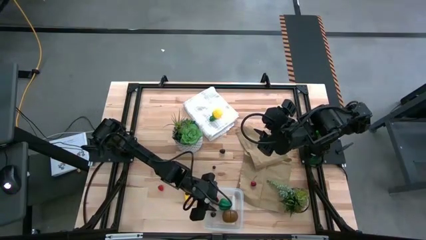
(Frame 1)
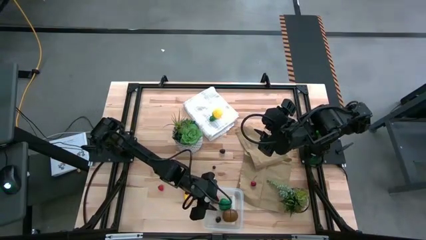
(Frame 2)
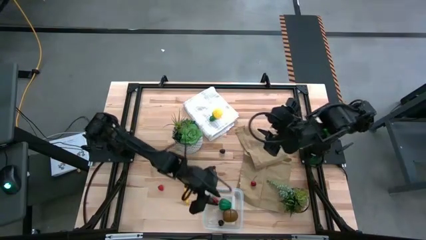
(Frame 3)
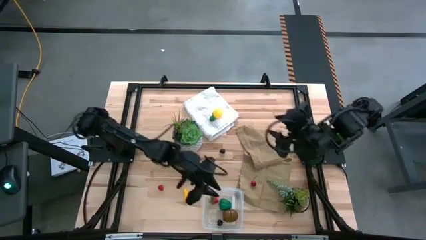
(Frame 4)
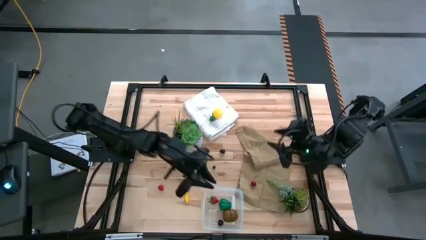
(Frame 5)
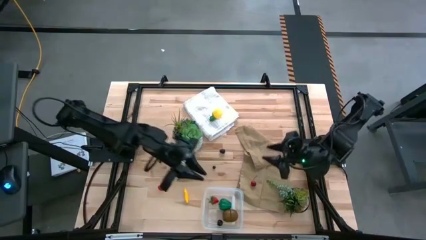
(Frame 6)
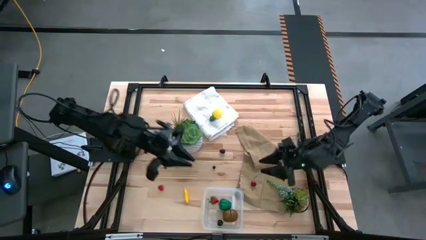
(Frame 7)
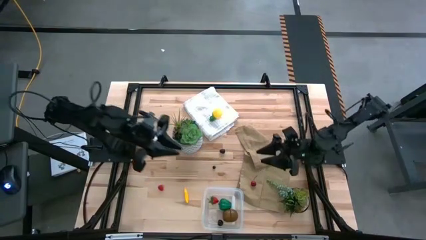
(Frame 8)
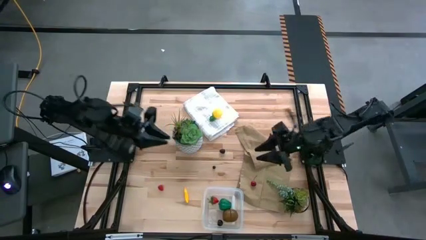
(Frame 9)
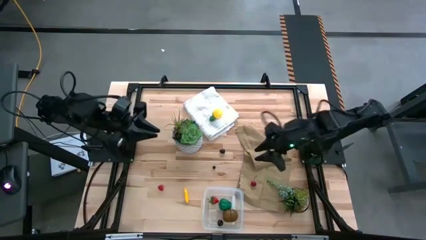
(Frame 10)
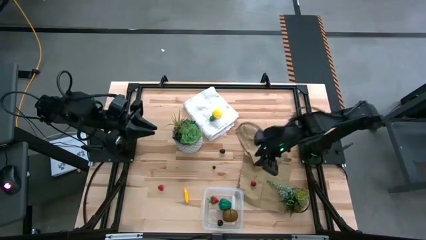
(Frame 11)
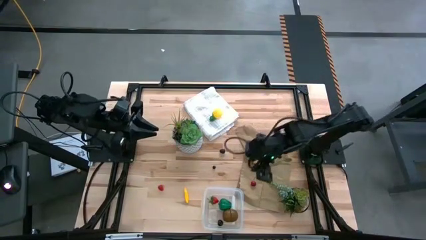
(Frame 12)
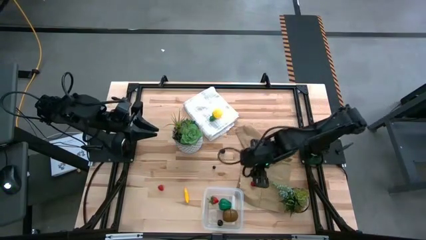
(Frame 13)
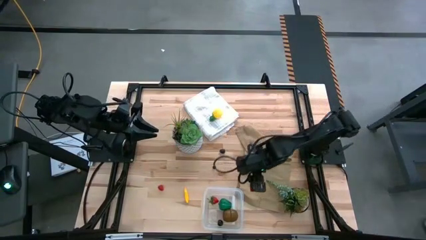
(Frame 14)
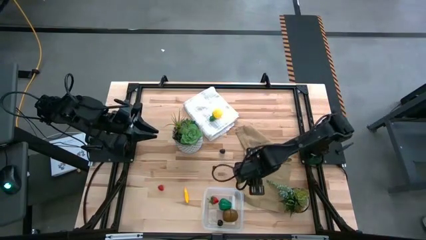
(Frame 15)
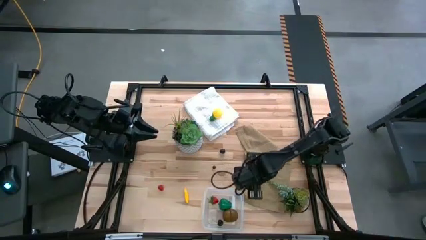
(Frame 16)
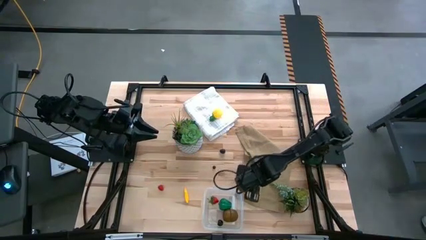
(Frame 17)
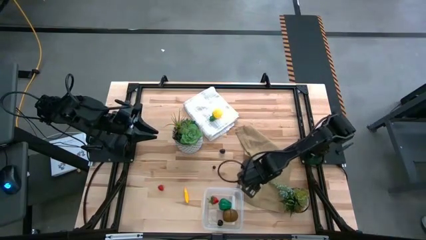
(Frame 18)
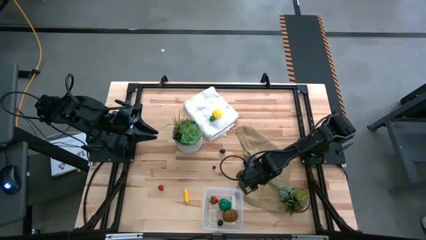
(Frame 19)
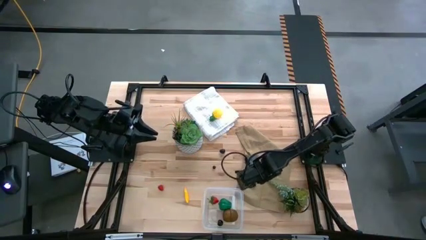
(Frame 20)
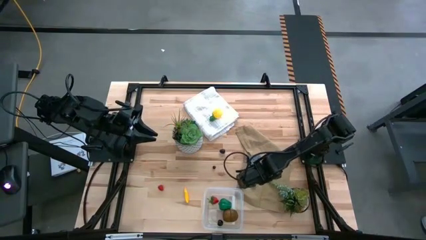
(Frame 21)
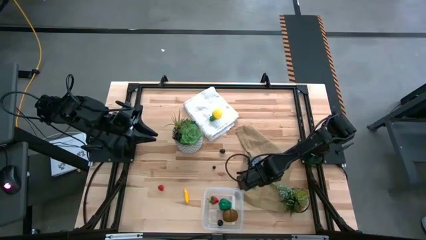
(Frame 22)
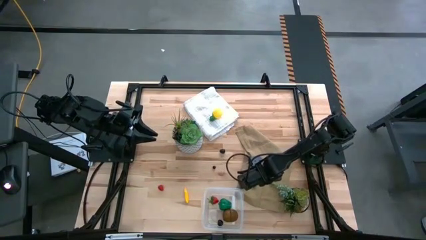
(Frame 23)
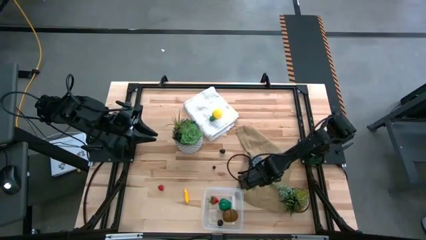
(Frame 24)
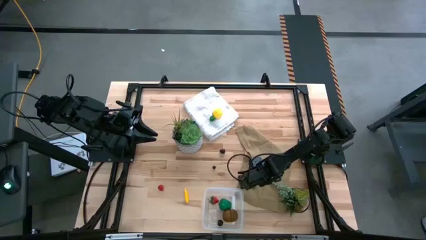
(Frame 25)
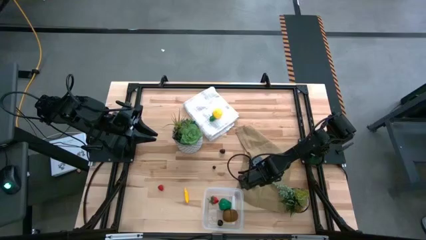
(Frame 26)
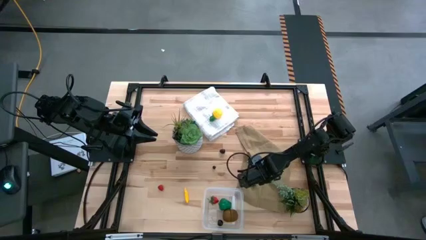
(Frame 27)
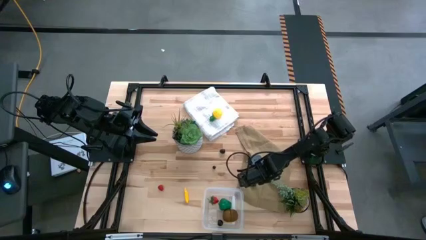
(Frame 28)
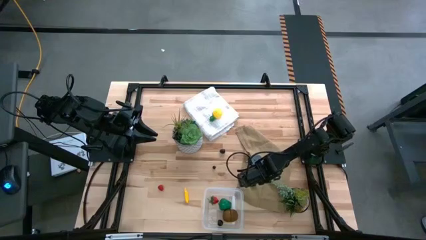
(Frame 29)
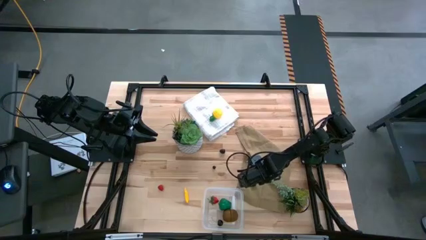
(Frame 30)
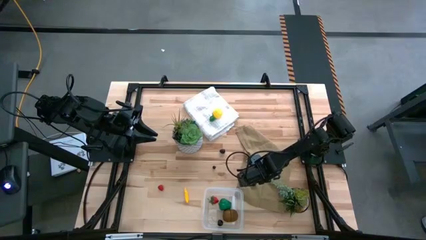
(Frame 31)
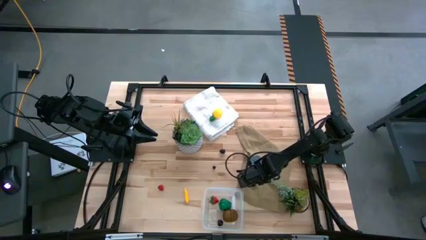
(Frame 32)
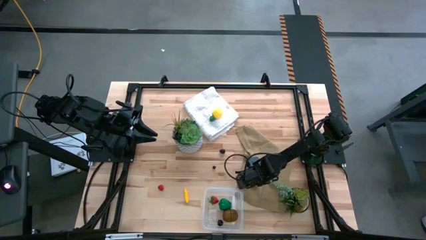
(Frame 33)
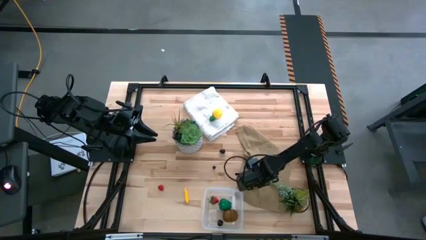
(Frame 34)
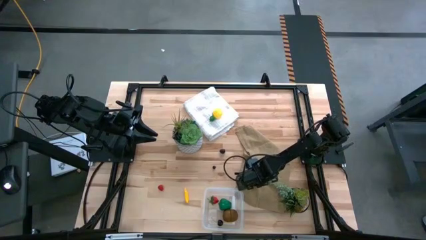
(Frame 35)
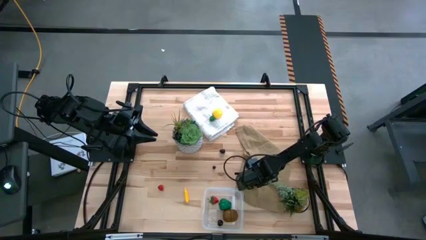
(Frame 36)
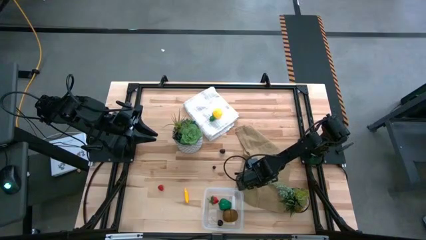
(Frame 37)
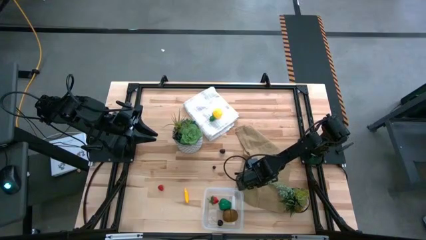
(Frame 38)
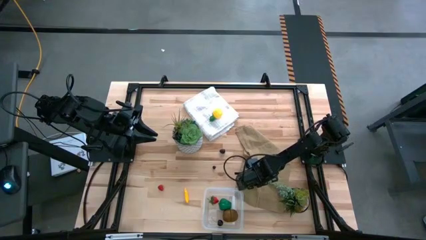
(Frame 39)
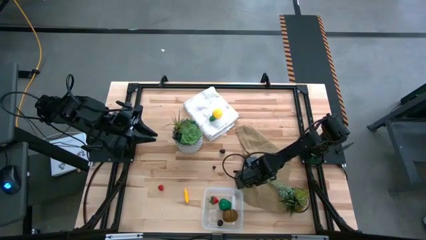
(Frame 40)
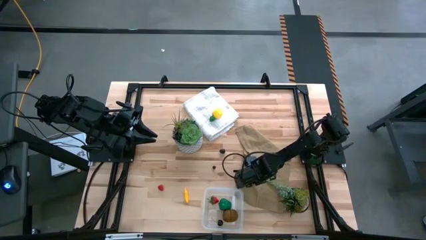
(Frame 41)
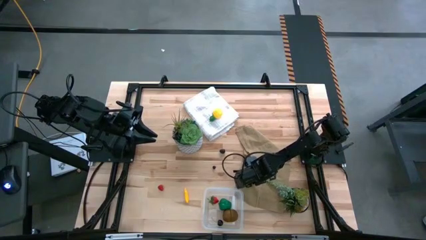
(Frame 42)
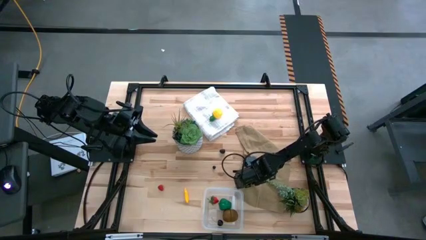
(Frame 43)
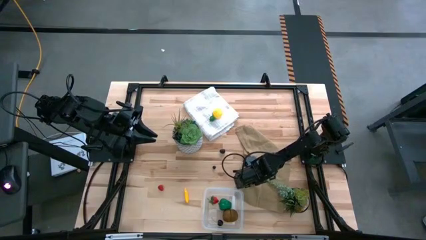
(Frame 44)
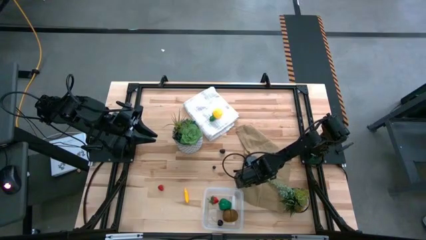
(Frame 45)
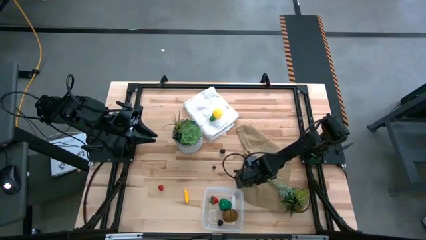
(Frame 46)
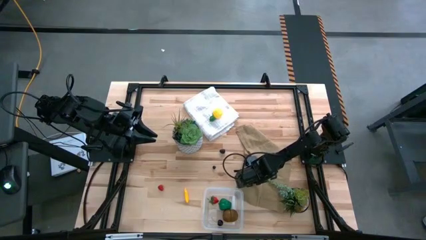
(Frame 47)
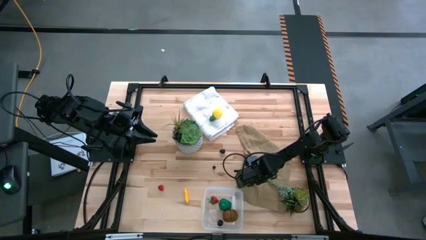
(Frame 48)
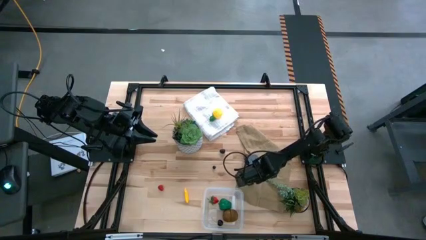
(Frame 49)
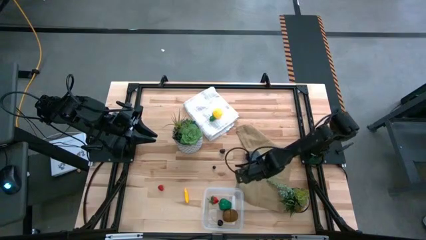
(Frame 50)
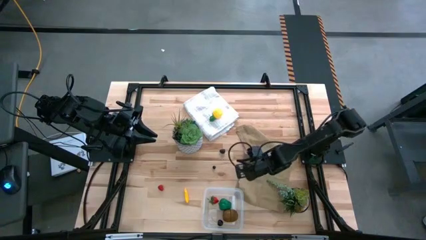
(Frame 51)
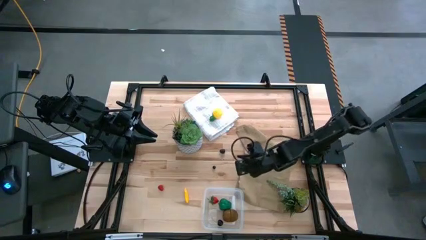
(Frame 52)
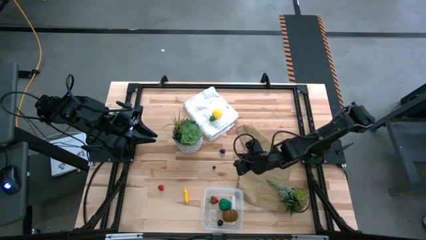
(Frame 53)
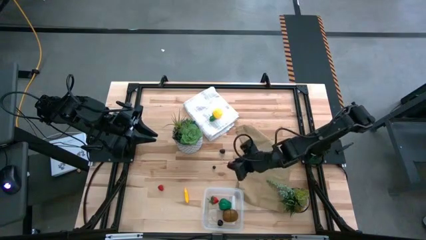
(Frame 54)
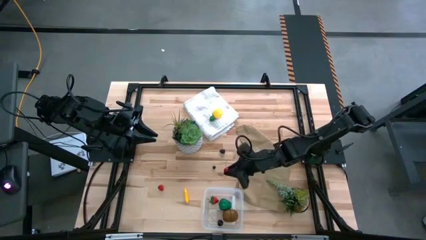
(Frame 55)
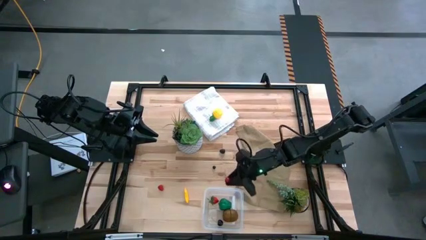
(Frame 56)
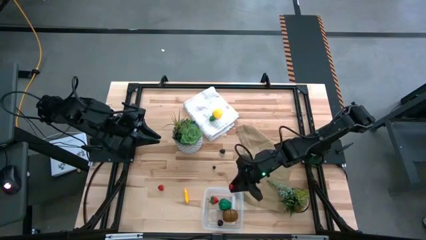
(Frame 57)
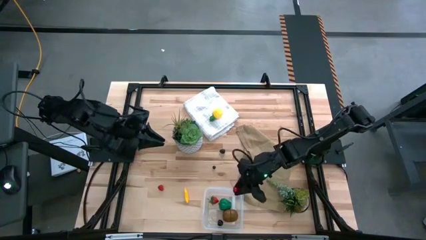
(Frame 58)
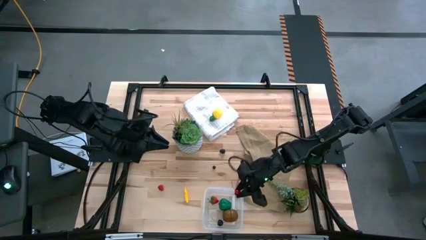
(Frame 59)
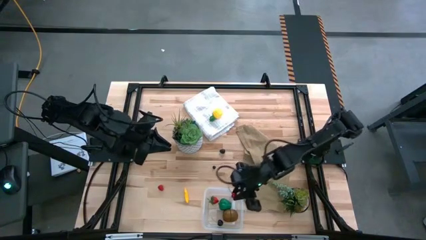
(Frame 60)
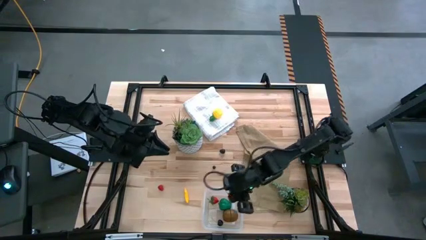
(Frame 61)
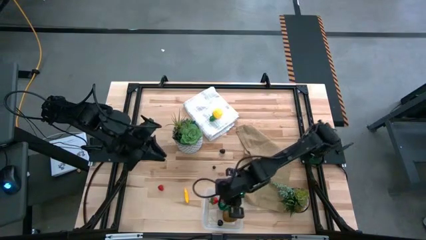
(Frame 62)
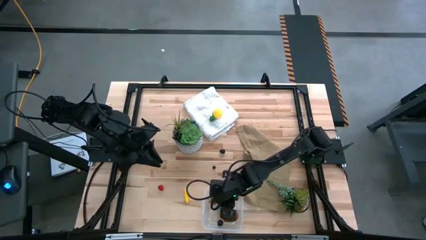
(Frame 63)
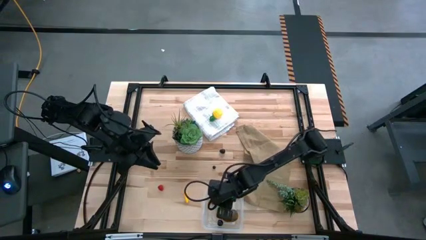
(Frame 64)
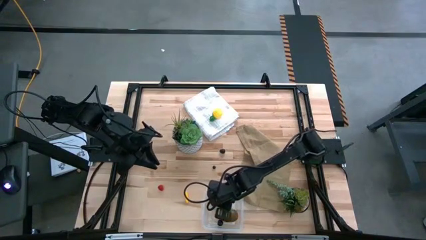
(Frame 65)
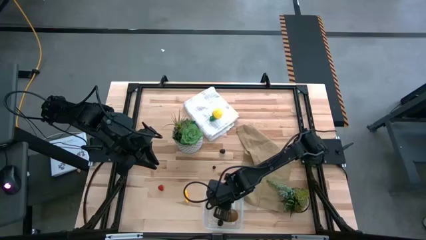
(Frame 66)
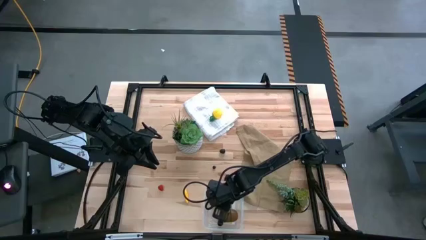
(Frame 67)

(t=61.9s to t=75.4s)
Task: Pick and placing Produce into tupperware
Put the red cherry into the transparent bin

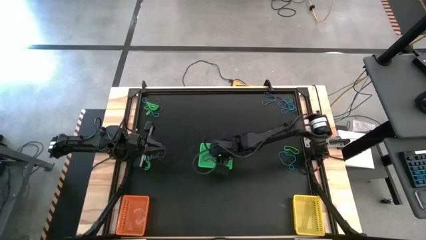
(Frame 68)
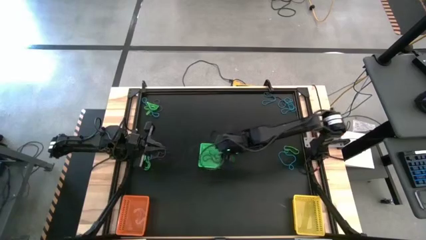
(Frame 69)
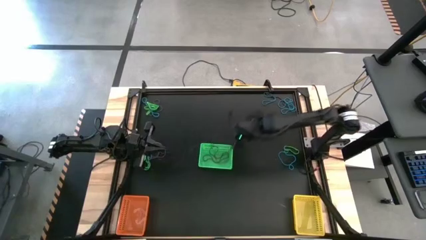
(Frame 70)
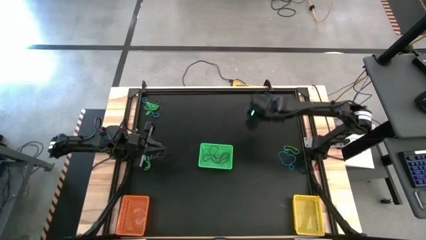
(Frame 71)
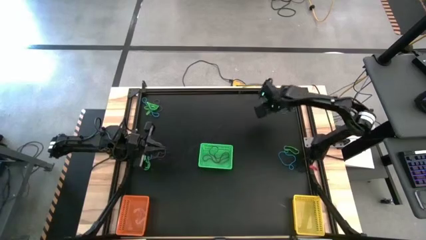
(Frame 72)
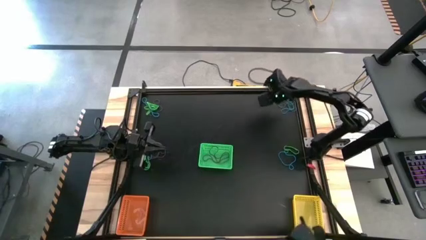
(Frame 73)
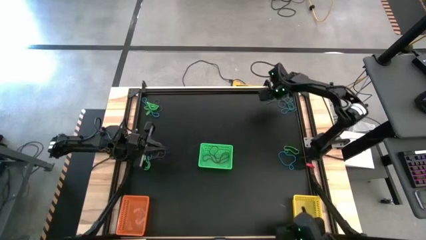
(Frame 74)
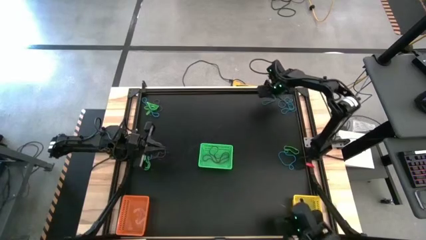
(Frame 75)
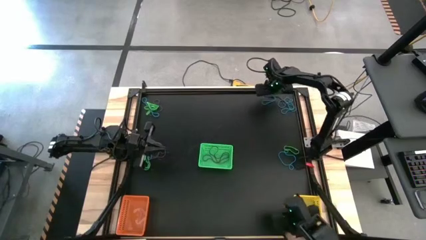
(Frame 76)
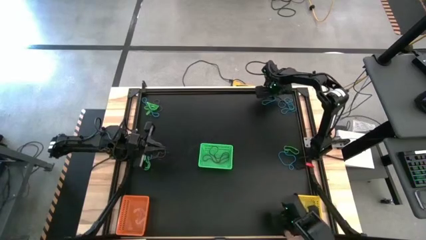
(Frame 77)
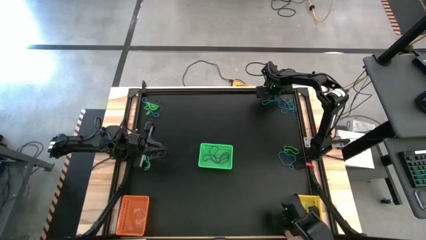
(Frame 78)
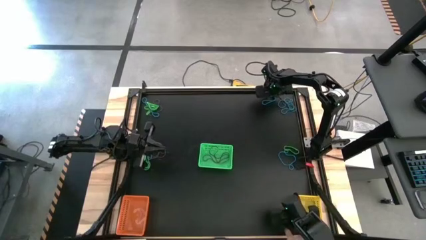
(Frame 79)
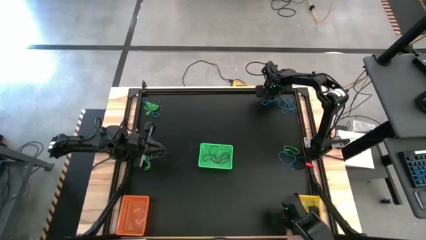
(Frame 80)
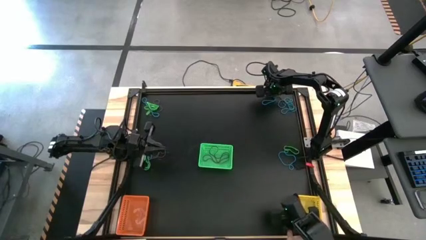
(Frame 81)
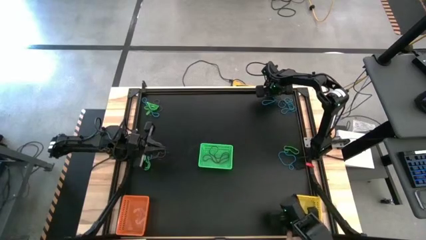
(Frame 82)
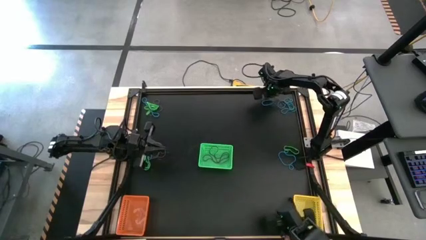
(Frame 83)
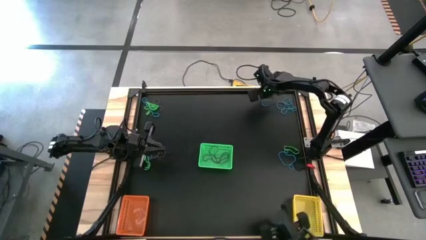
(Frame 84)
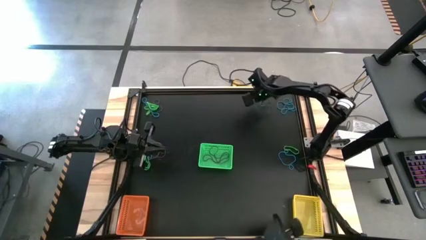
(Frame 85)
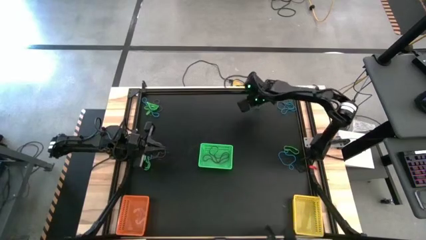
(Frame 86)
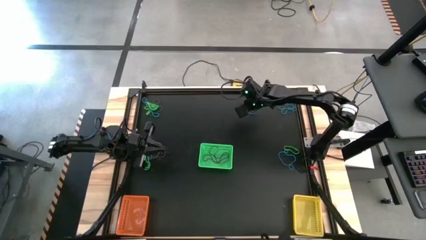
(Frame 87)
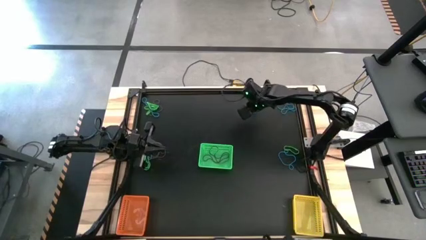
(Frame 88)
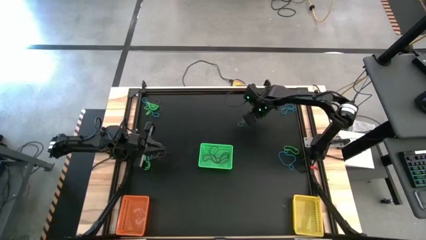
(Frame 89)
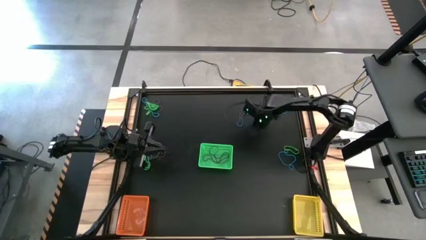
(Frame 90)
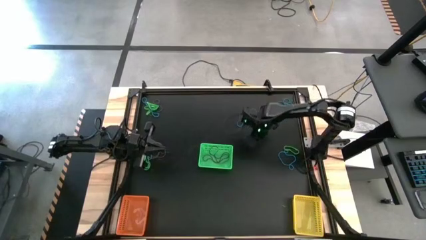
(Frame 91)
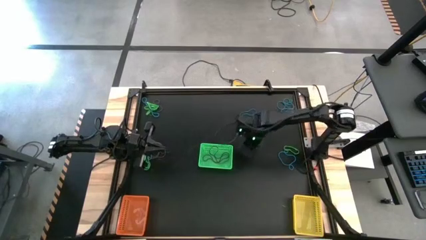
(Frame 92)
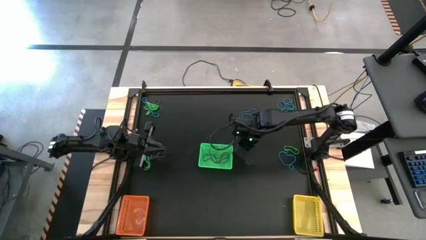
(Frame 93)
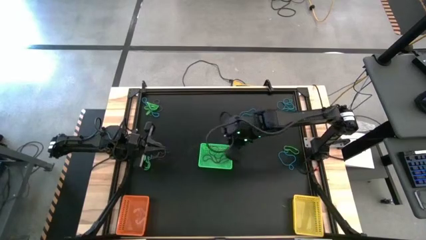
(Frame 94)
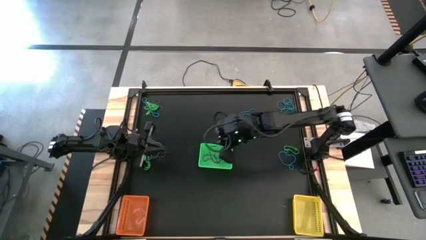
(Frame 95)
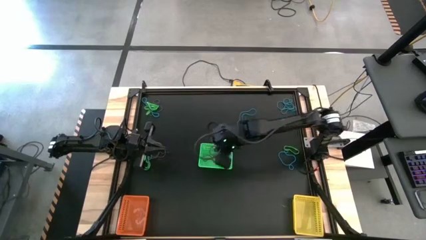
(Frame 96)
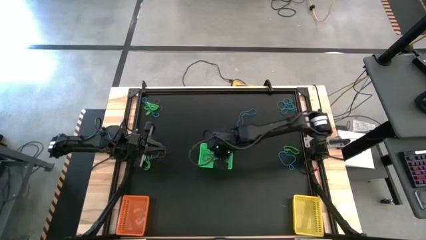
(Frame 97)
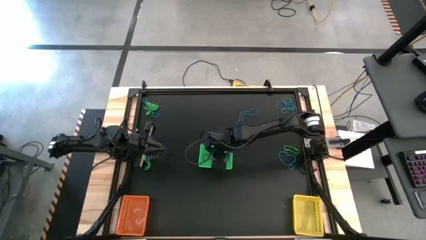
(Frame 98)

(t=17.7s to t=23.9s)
Task: Sort rubber bands into baskets
Put the violet rubber band into the green basket
